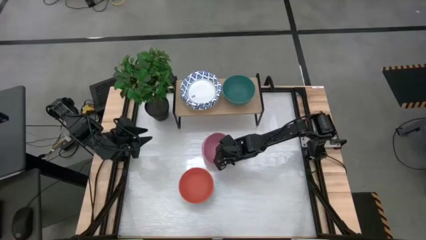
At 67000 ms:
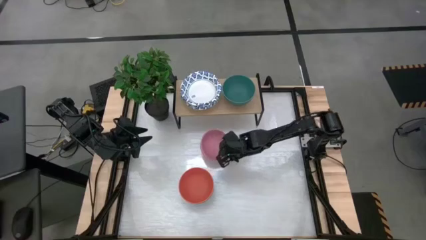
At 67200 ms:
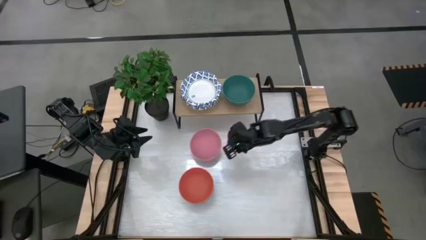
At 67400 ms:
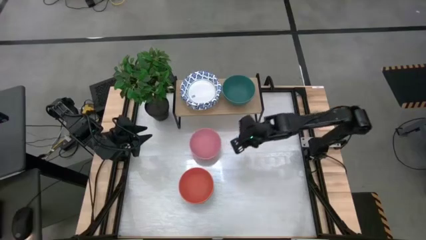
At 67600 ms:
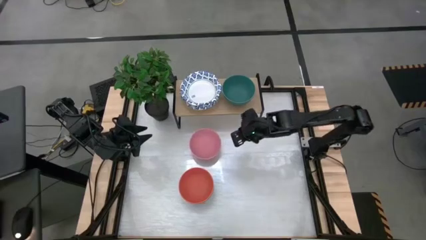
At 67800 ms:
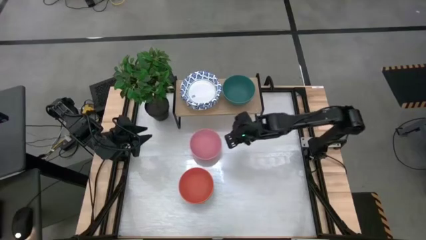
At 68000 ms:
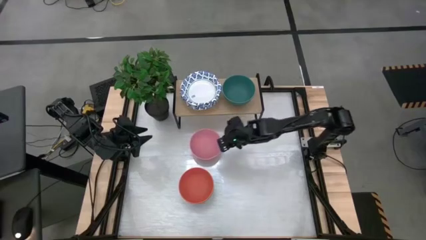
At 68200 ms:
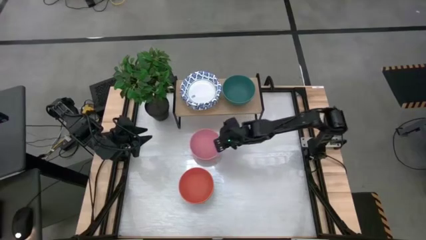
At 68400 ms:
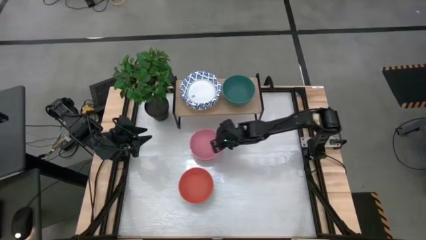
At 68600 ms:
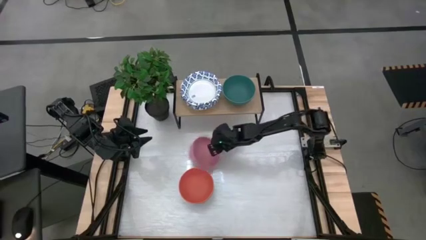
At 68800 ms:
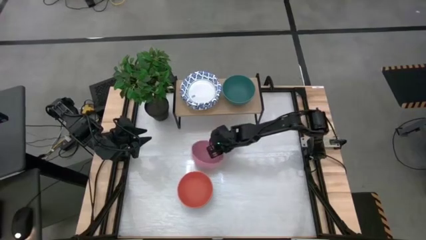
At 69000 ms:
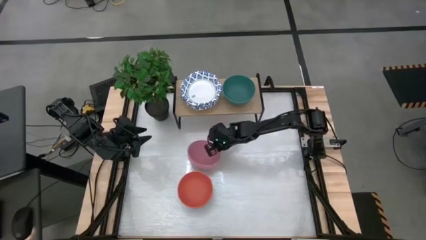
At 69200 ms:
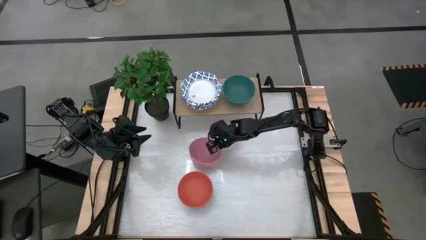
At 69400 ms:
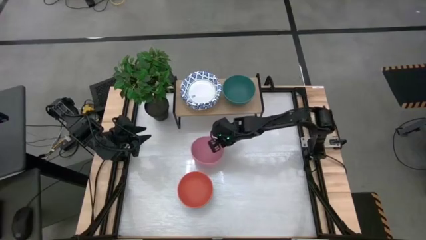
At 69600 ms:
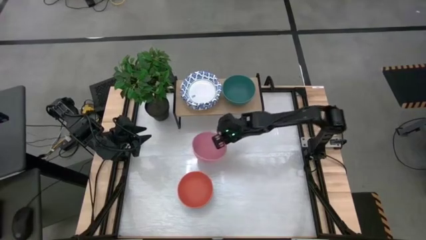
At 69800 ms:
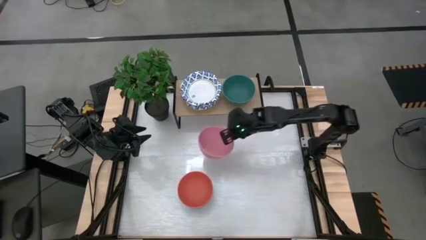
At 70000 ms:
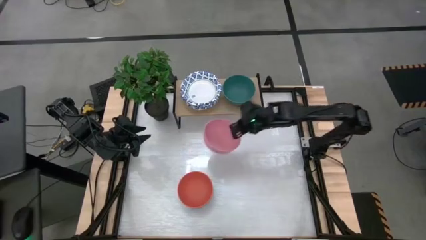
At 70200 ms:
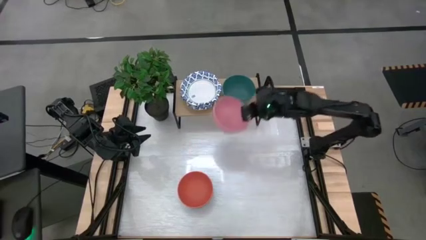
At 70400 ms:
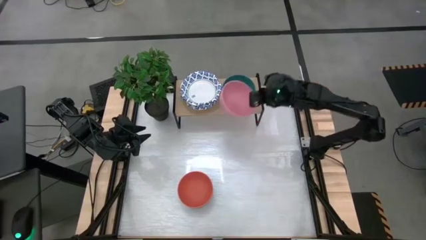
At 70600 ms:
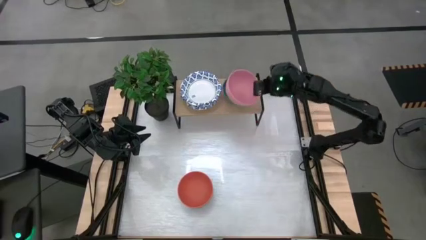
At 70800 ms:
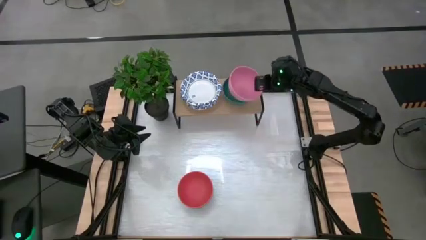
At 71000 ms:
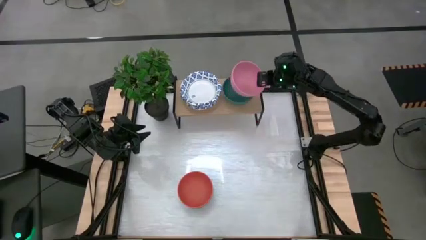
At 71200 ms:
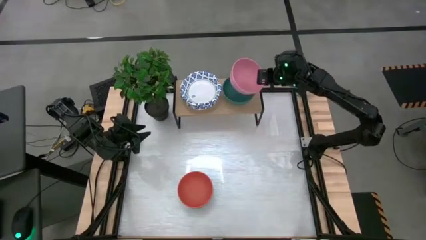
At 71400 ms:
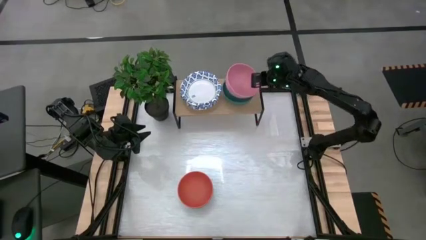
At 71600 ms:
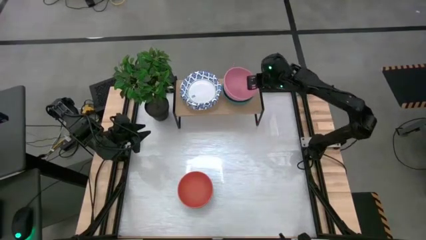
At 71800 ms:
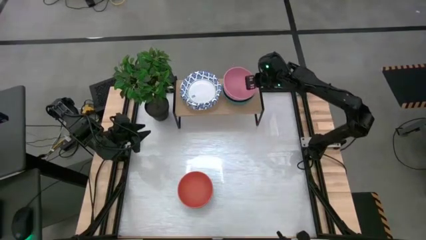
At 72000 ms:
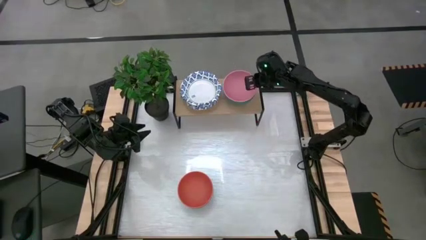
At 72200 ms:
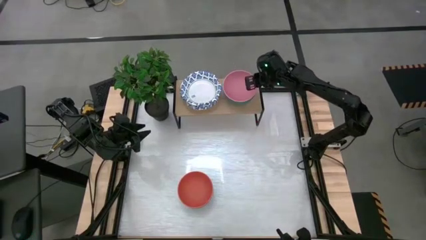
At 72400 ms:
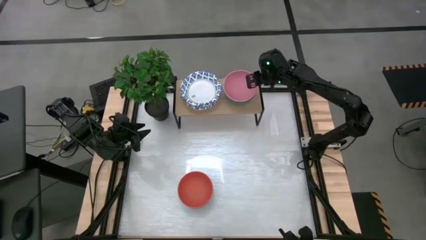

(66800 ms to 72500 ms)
Task: Place and stack bowls onto a shelf
Stack the pink bowl on top of the dark green bowl on the shelf

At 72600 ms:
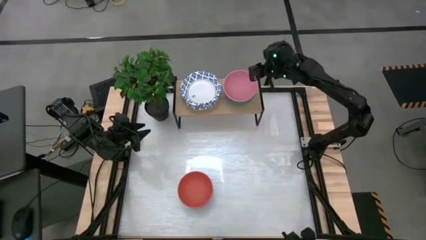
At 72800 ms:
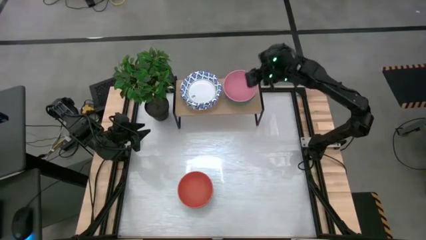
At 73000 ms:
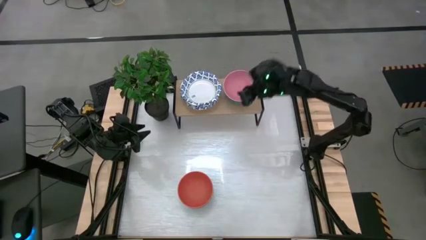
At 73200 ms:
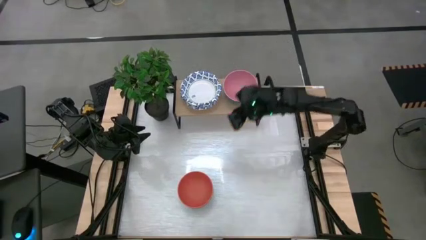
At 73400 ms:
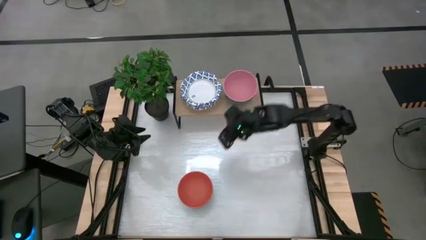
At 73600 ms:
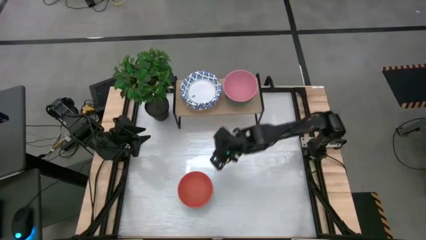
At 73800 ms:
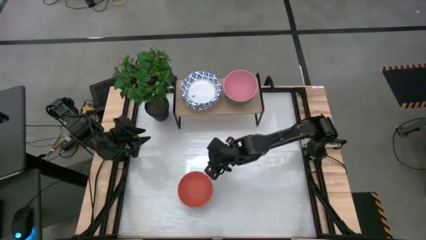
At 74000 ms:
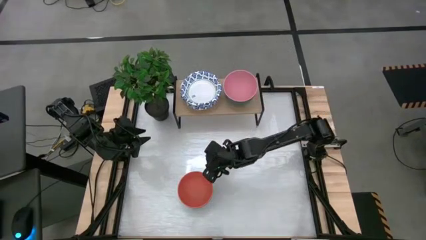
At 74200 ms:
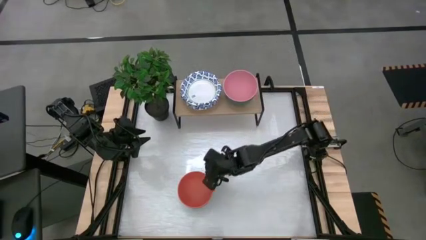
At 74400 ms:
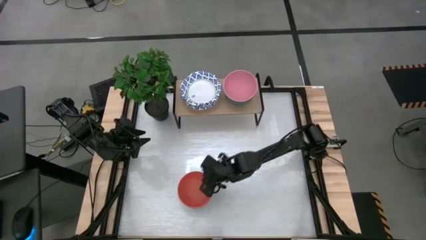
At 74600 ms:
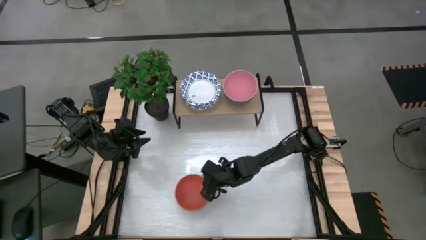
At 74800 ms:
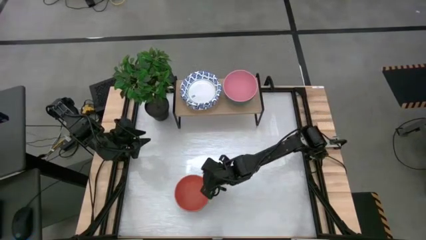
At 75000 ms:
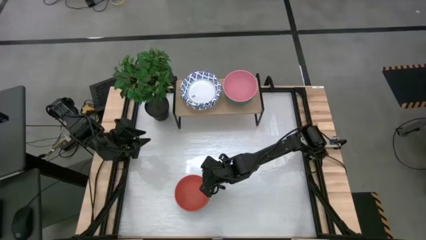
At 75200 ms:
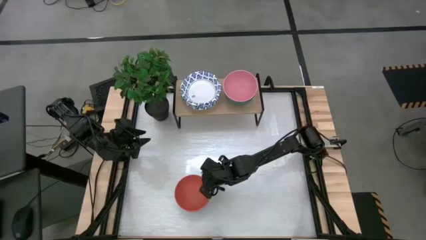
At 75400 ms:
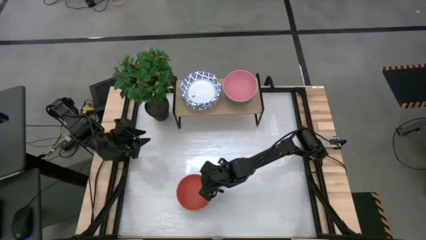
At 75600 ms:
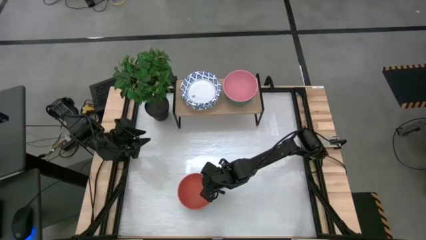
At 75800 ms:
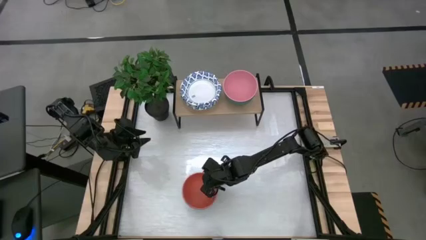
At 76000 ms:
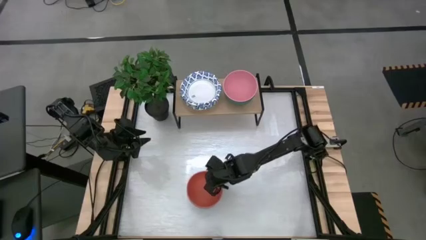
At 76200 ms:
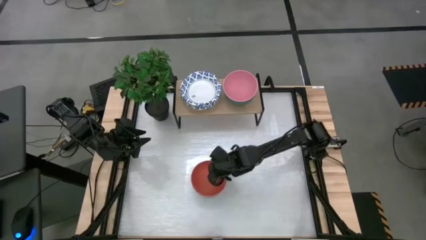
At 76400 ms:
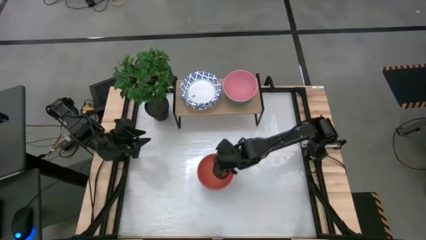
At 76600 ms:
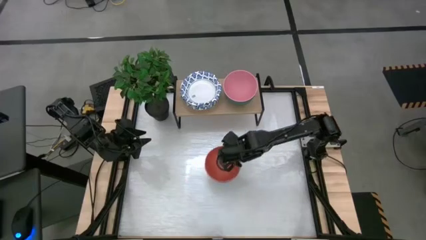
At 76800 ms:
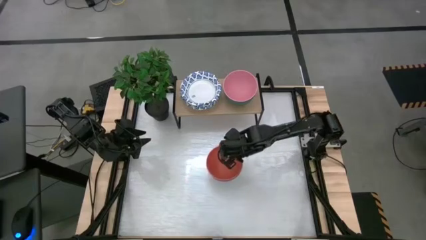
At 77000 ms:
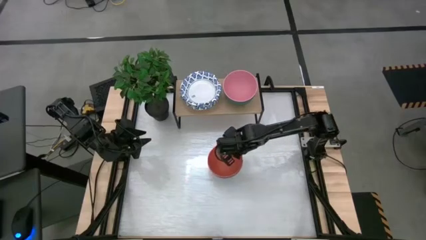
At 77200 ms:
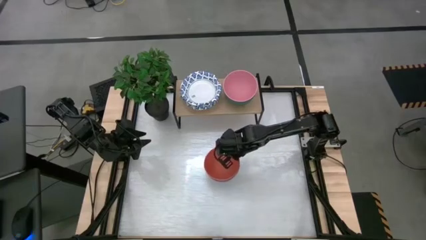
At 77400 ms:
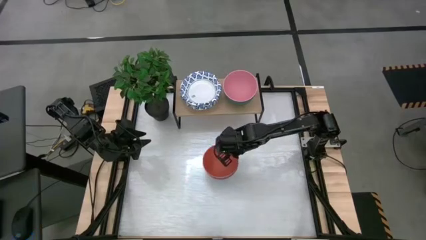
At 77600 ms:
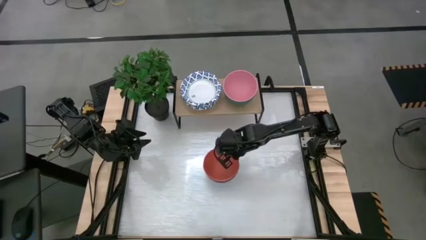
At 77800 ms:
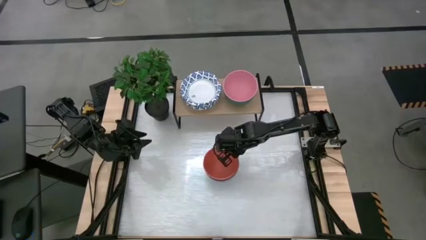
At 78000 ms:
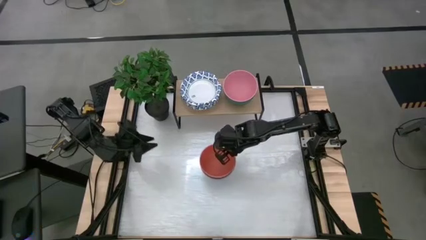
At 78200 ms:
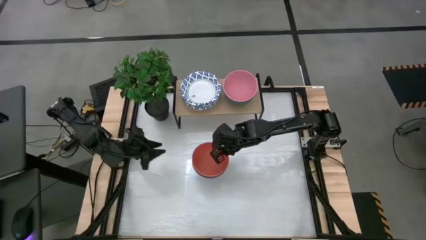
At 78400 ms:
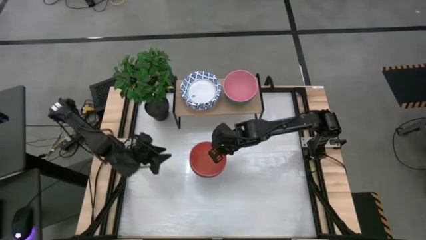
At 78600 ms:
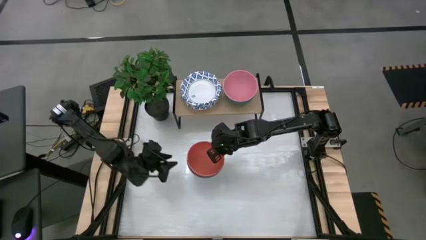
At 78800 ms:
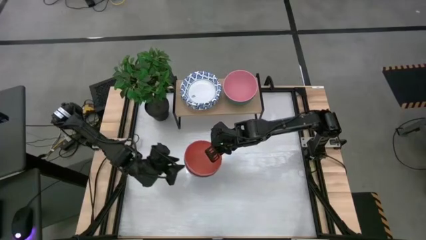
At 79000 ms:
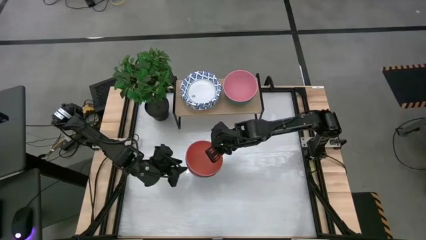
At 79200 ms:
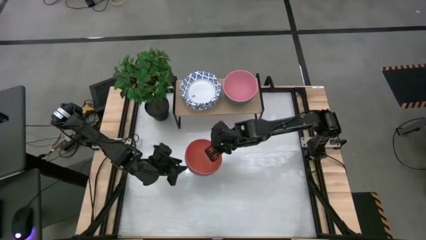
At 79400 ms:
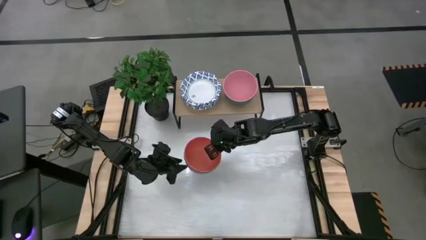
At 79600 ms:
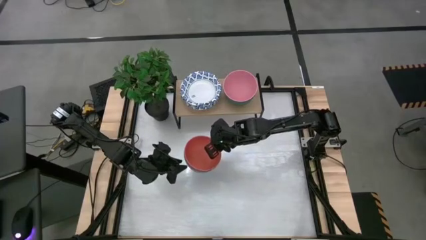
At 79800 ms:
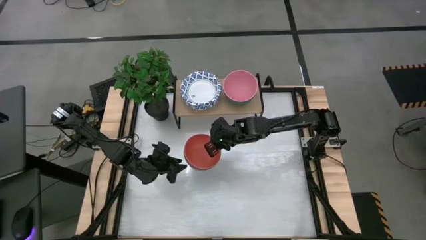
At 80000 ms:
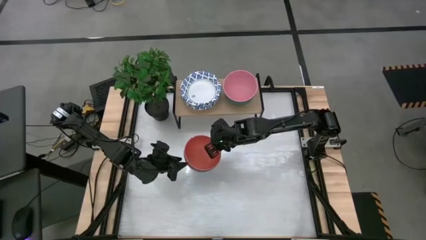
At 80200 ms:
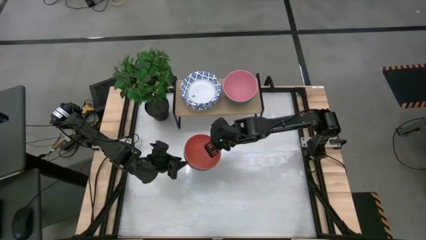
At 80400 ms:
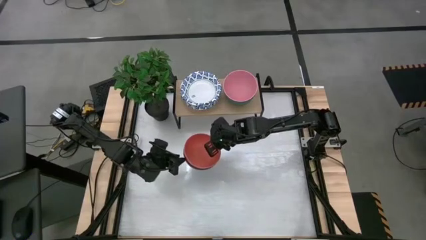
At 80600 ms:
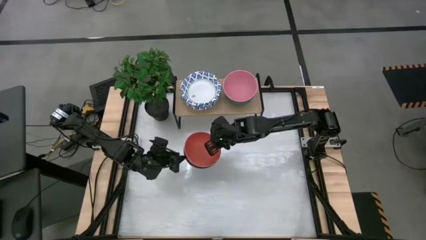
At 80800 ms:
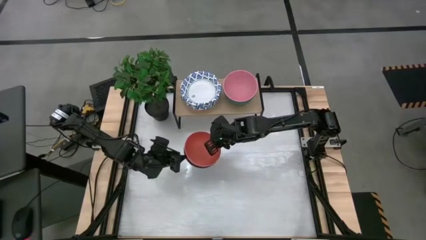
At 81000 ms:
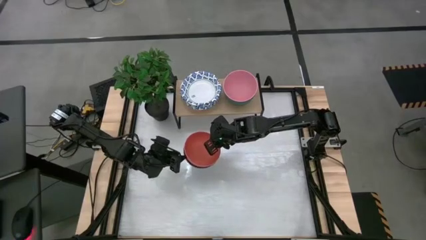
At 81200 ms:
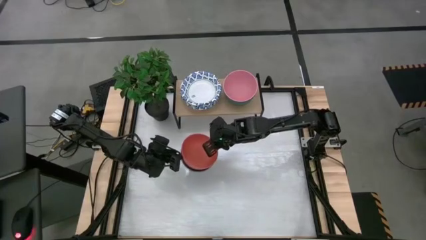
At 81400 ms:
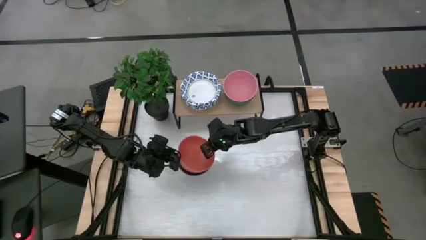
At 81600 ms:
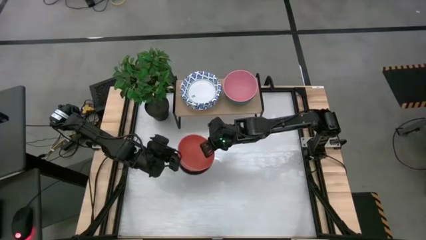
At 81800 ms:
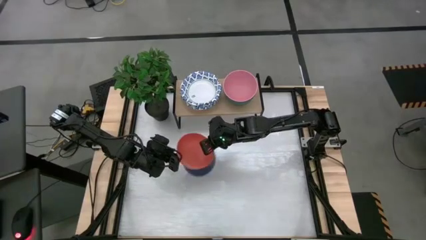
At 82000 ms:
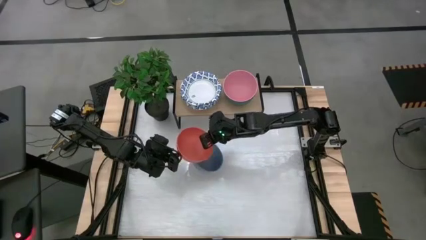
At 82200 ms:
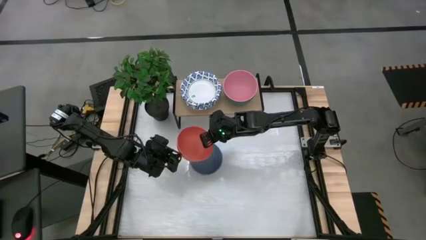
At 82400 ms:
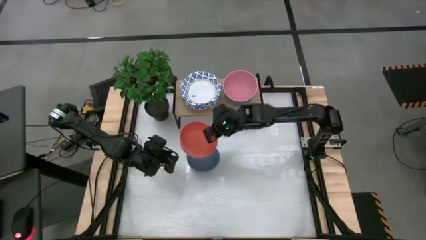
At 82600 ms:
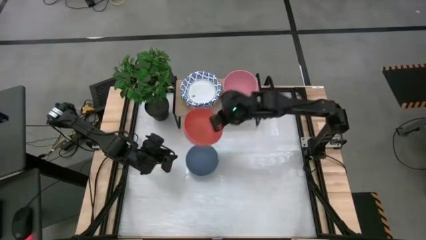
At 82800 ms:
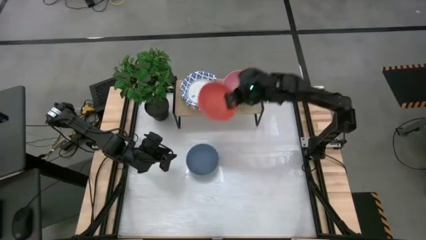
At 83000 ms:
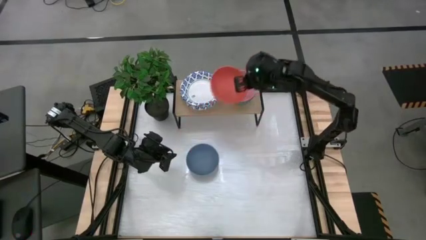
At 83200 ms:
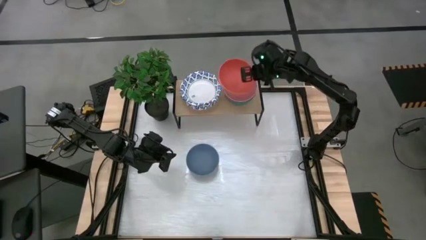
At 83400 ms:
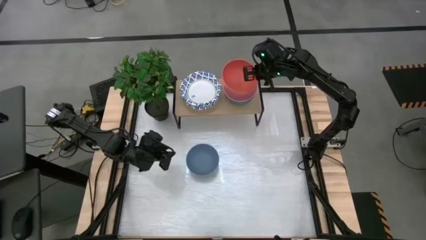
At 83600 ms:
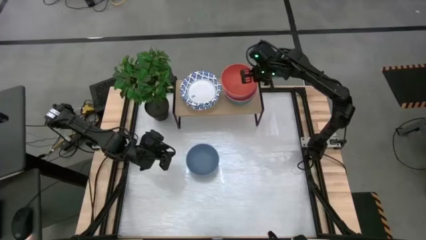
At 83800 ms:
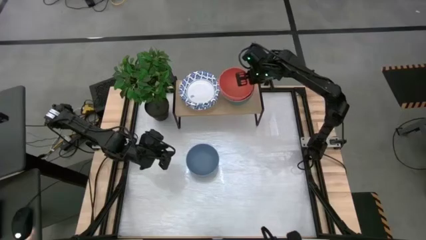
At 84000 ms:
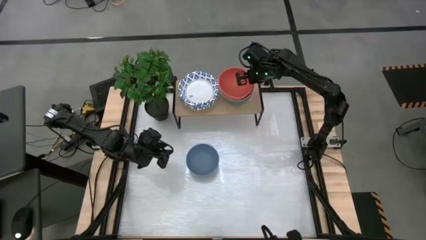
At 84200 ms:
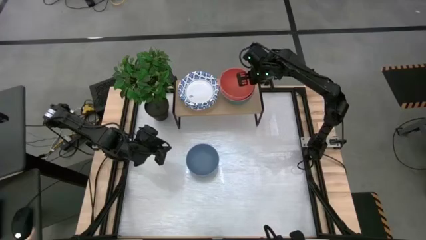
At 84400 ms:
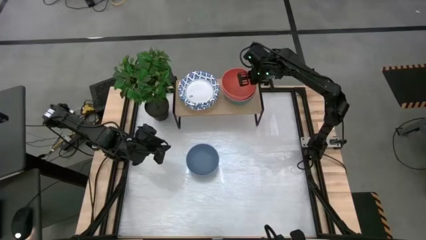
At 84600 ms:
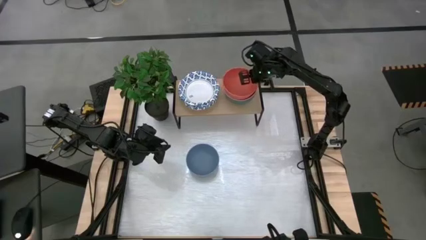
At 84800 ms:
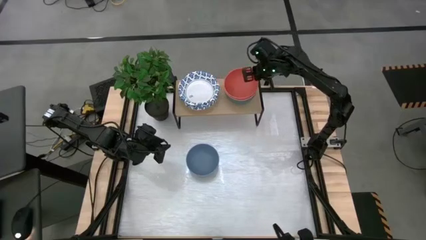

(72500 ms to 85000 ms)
Stack the orange bowl on top of the pink bowl on the shelf
